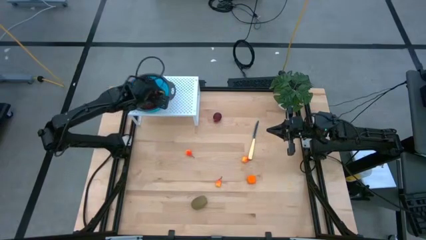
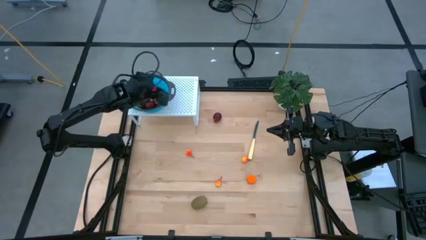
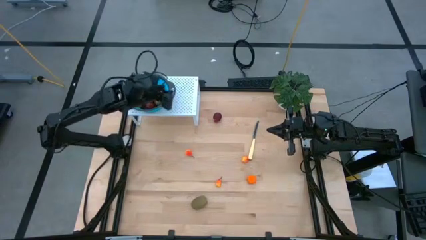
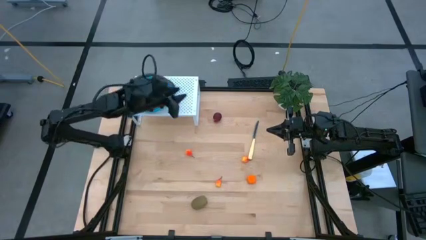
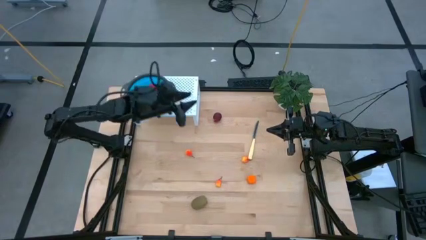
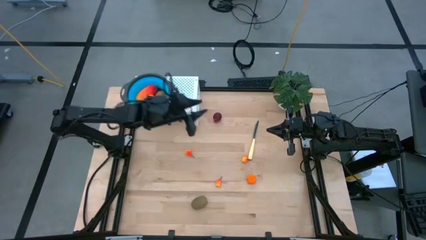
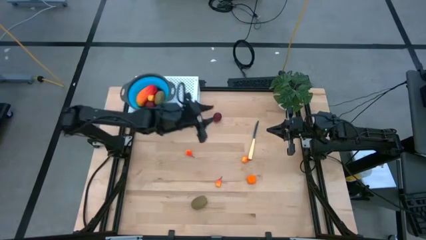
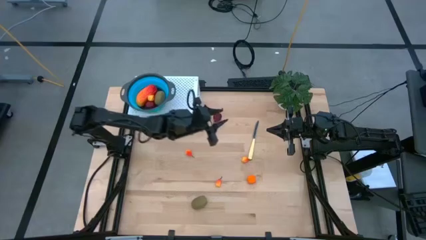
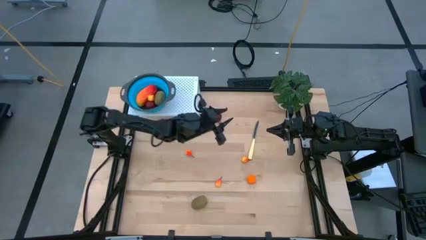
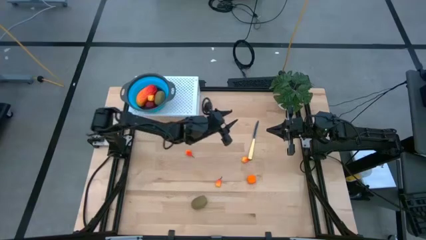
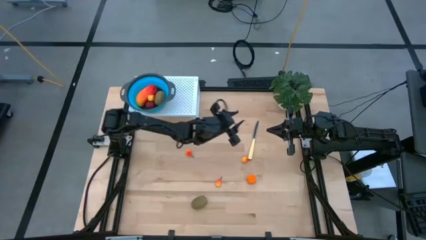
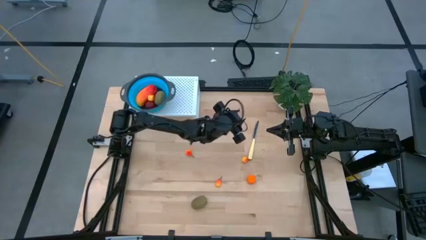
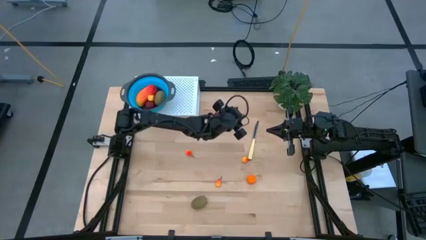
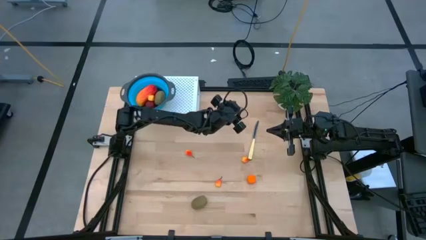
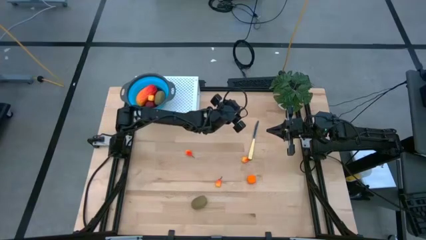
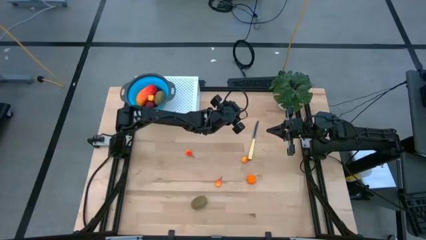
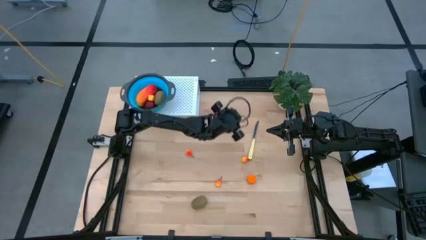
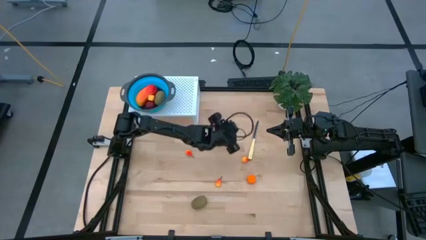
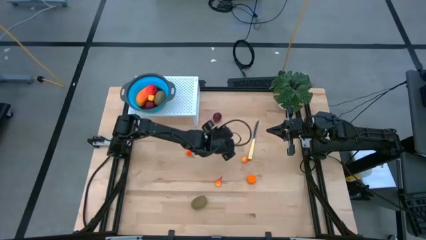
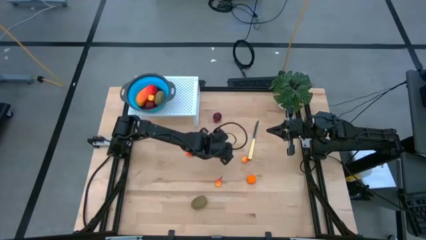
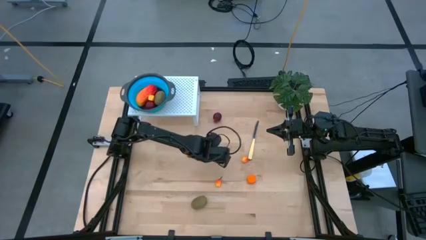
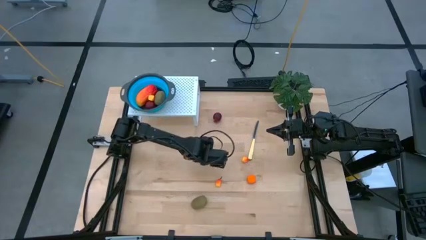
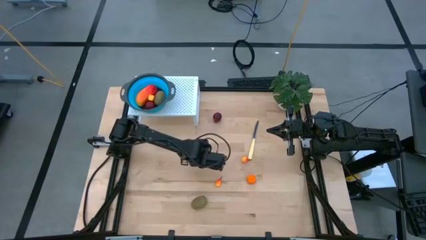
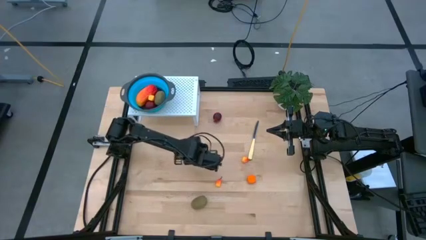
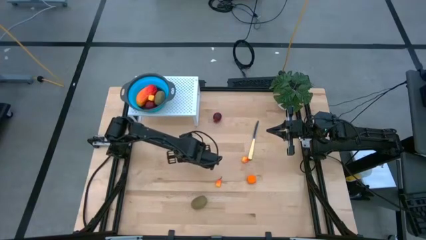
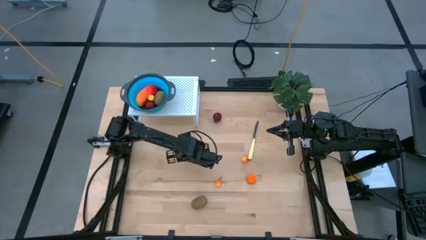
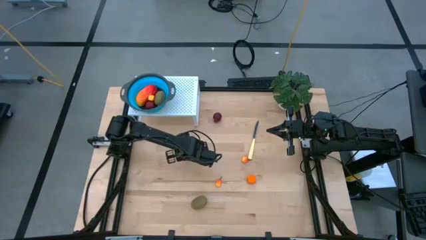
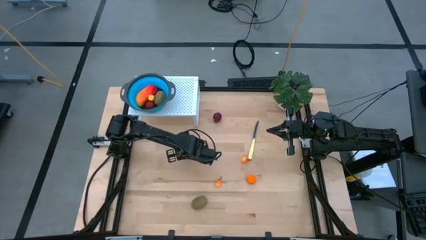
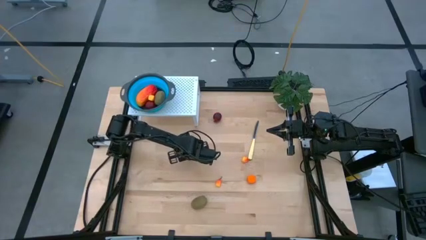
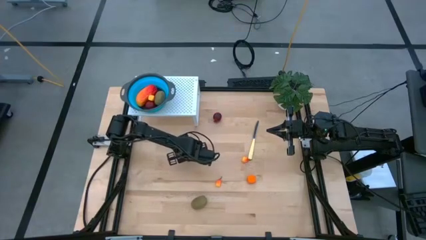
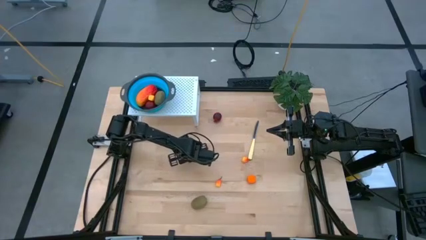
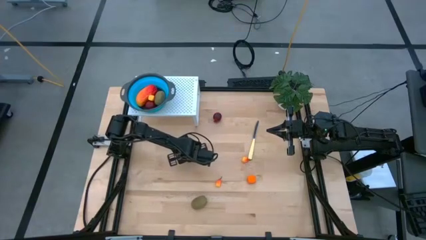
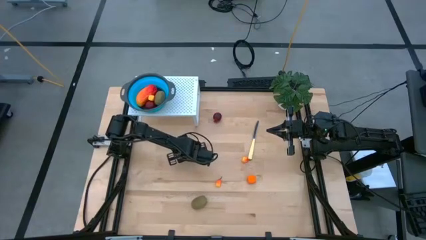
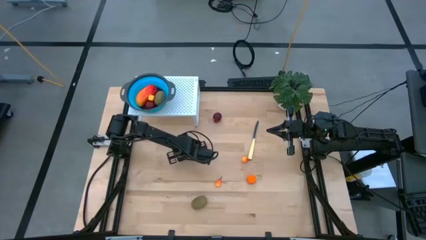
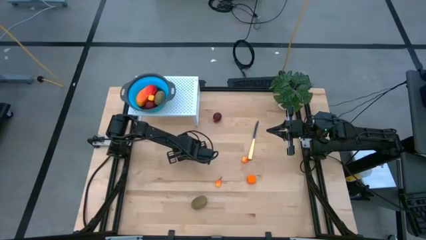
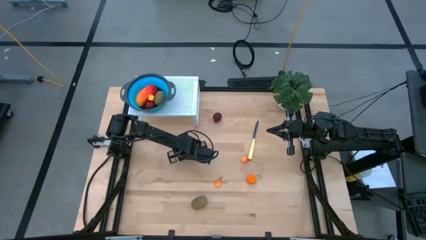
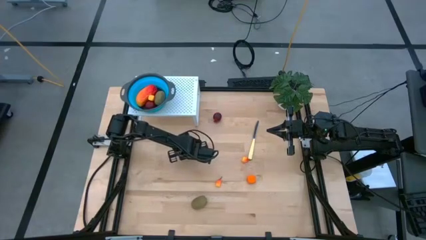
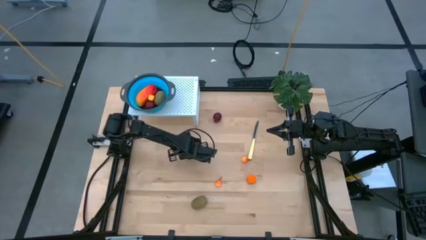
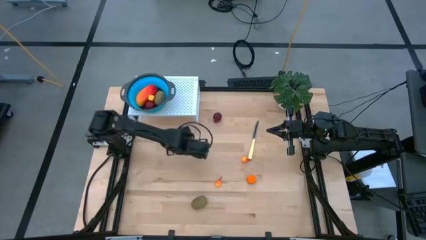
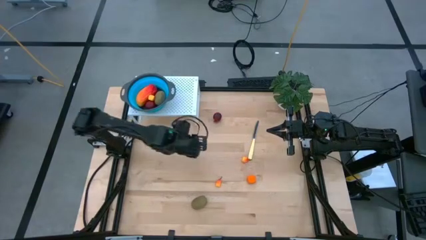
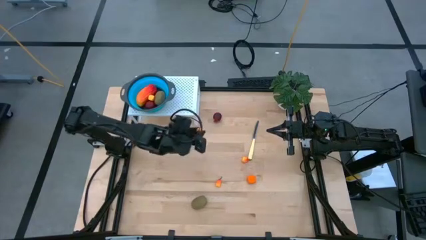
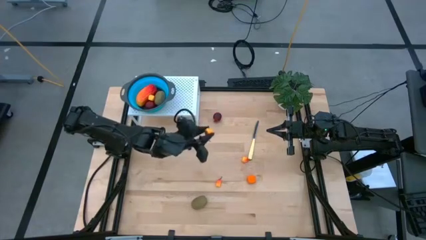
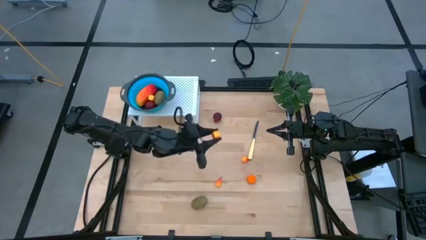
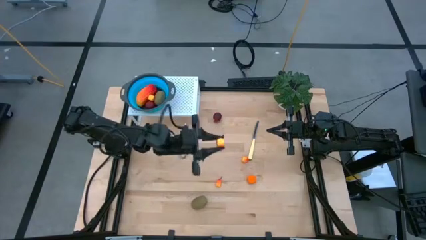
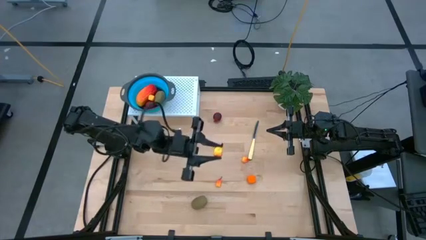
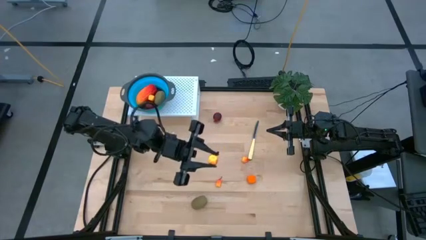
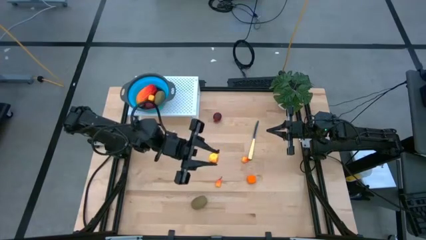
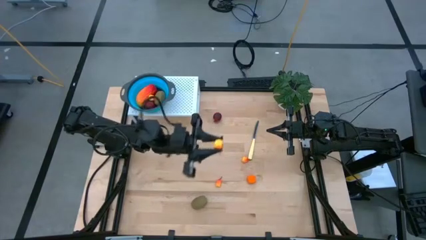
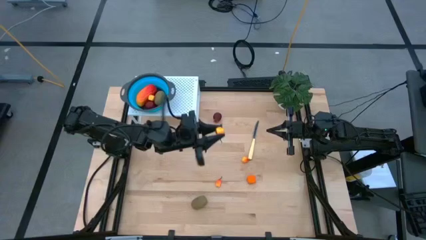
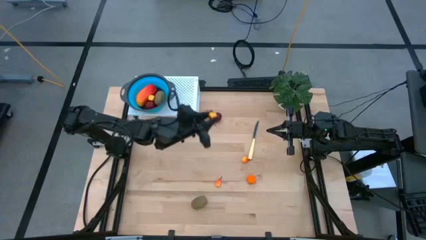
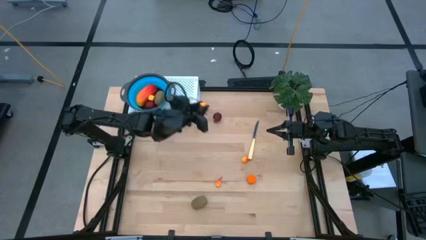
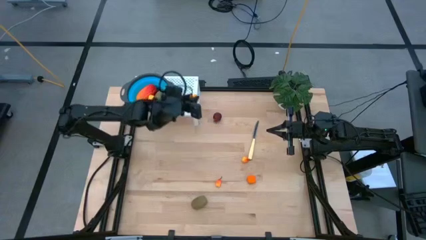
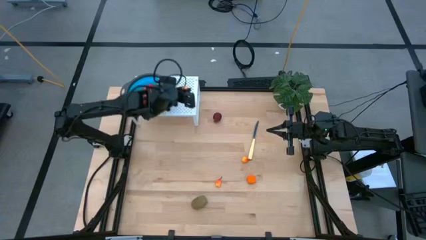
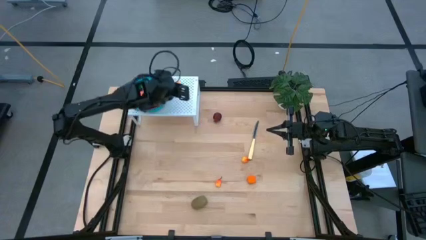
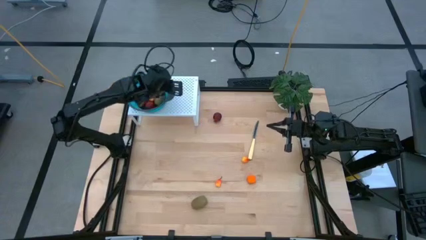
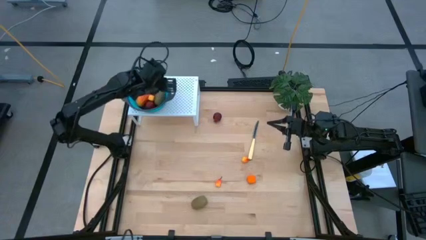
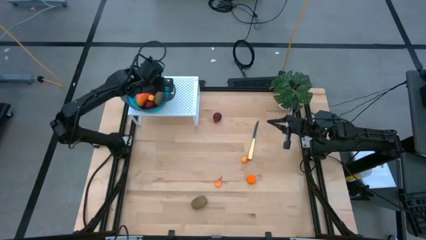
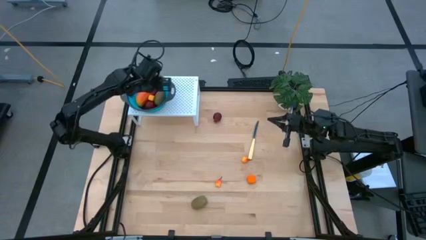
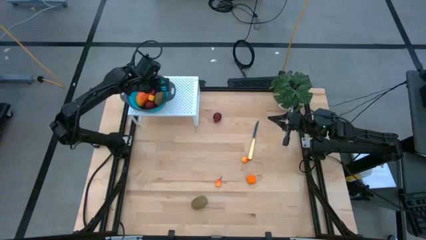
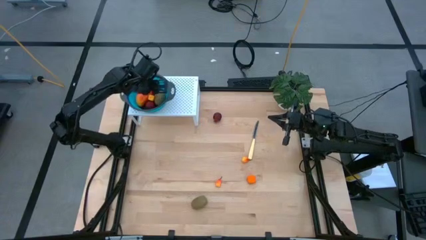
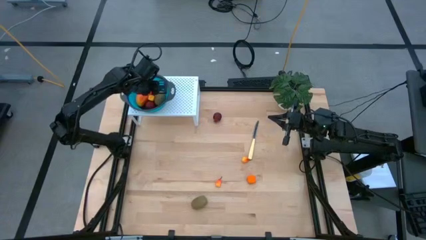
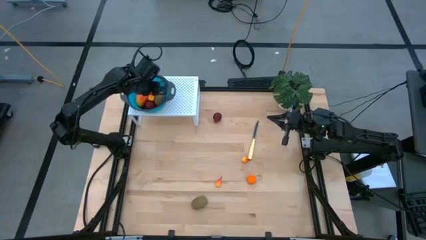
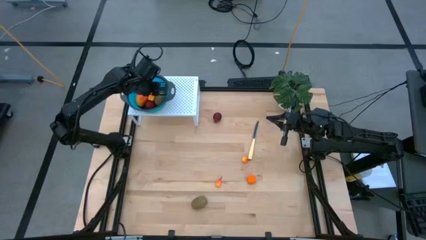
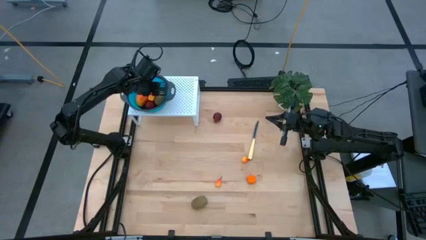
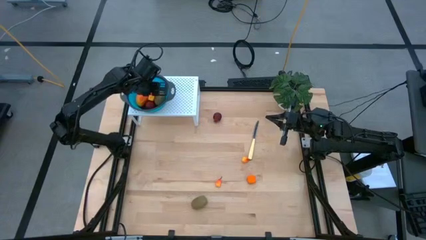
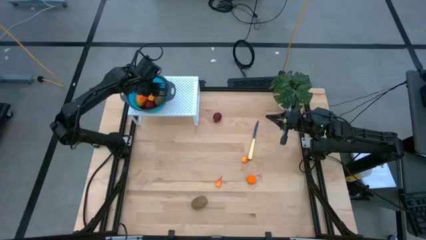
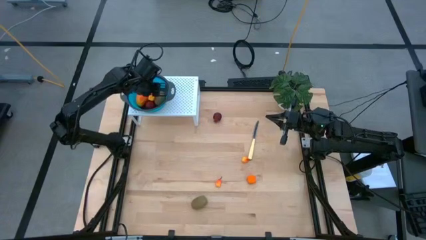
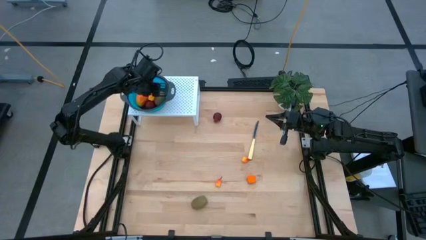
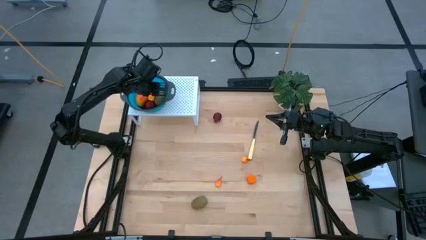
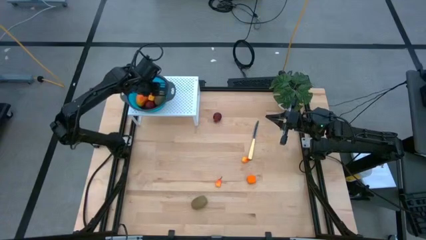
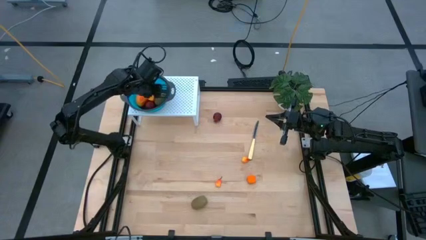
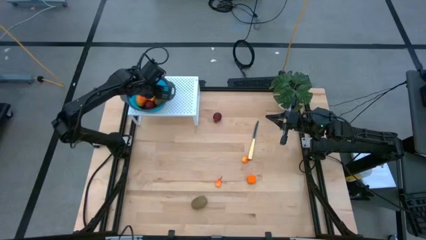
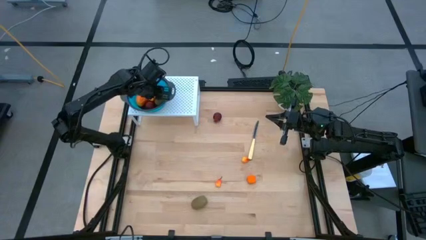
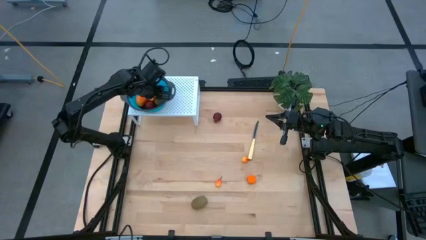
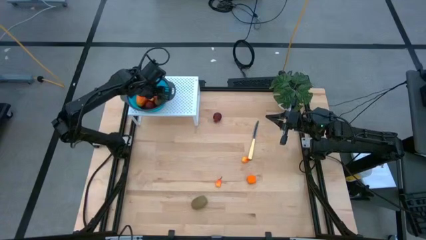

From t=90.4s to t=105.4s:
Task: Pick & Place Fruit
Put the orange peach into the blue strainer bowl on the shelf
